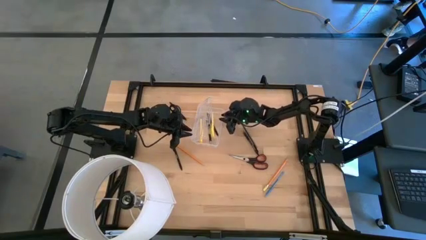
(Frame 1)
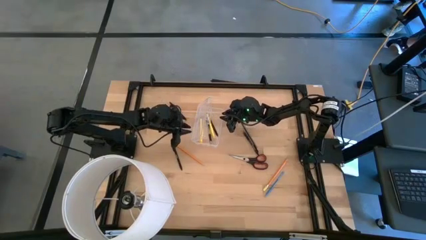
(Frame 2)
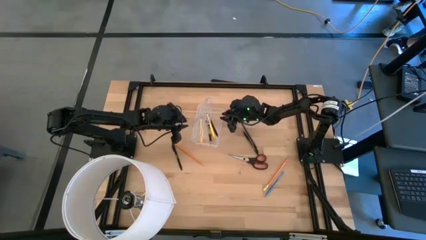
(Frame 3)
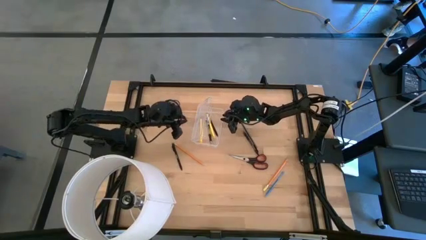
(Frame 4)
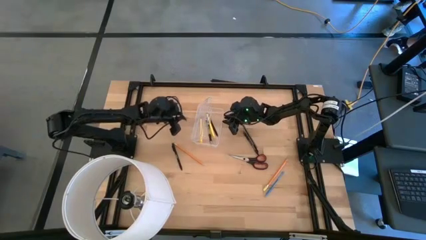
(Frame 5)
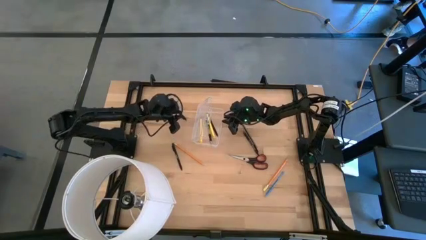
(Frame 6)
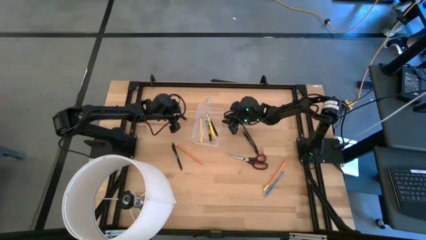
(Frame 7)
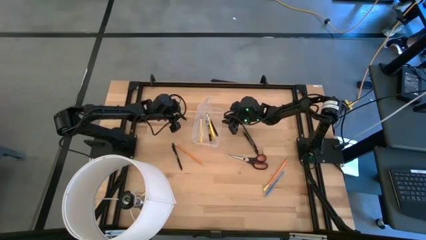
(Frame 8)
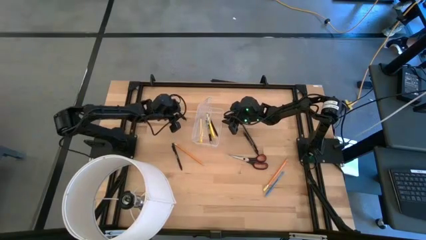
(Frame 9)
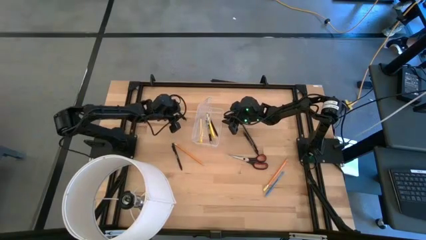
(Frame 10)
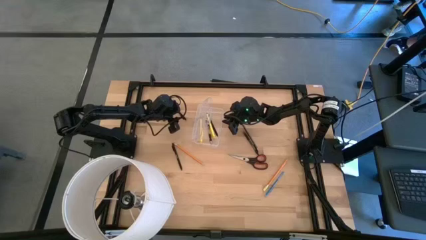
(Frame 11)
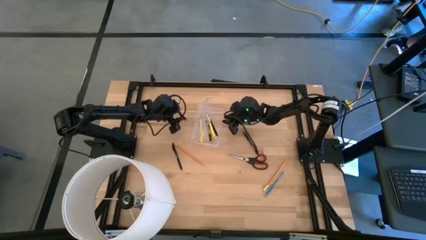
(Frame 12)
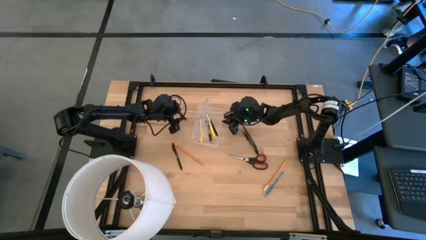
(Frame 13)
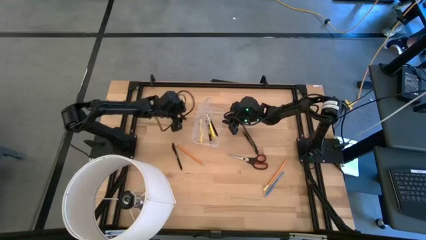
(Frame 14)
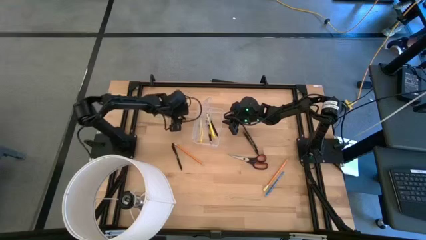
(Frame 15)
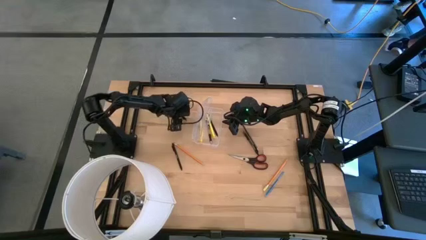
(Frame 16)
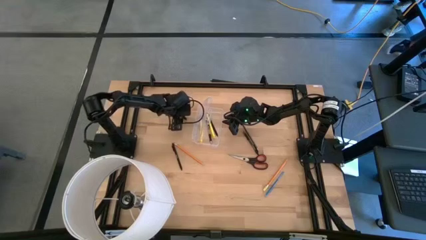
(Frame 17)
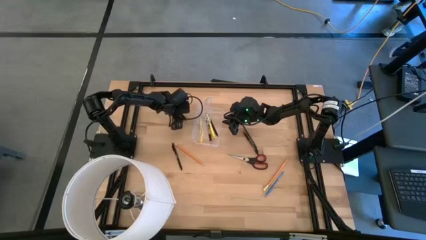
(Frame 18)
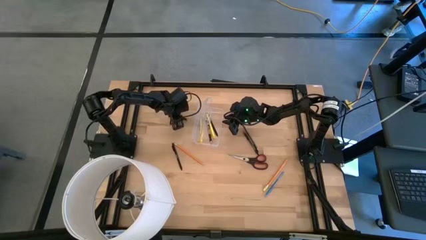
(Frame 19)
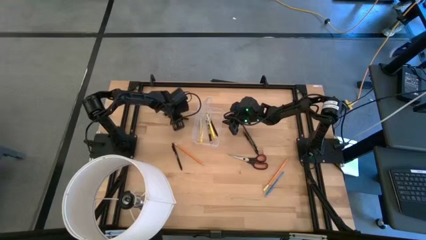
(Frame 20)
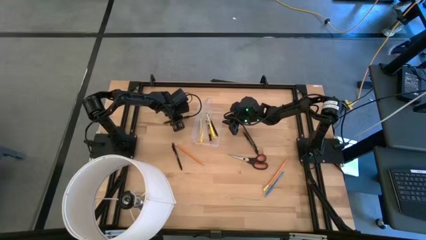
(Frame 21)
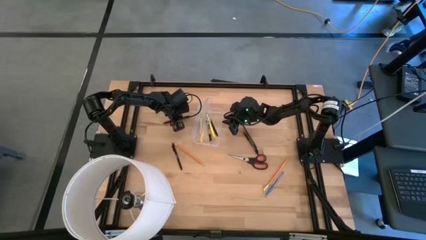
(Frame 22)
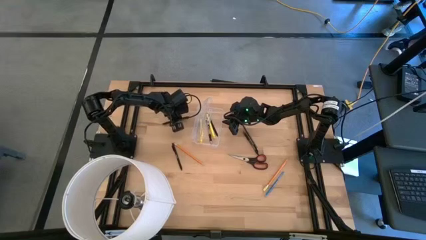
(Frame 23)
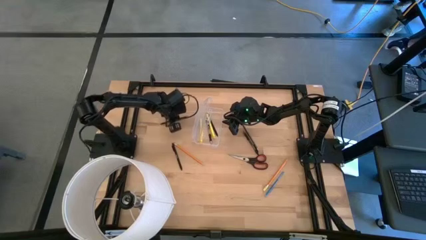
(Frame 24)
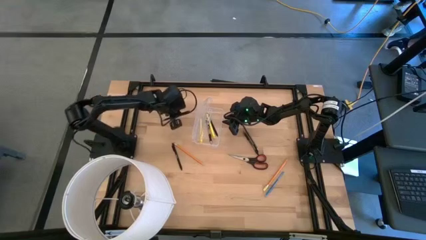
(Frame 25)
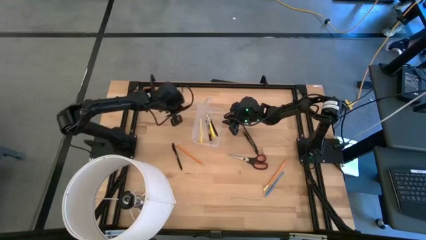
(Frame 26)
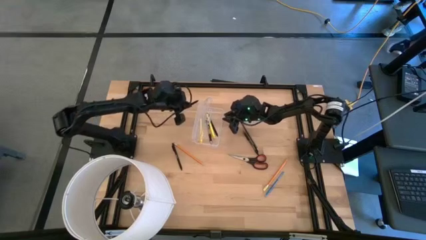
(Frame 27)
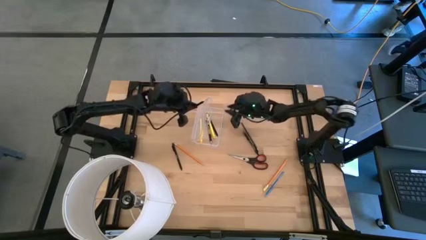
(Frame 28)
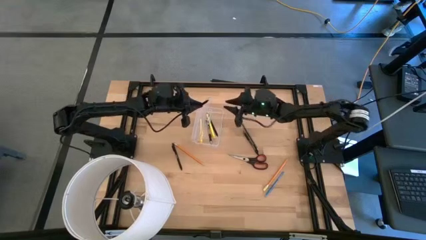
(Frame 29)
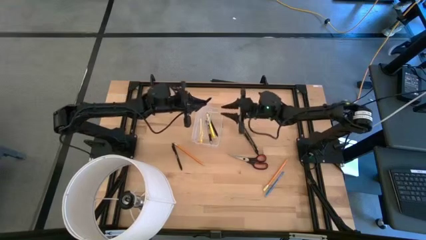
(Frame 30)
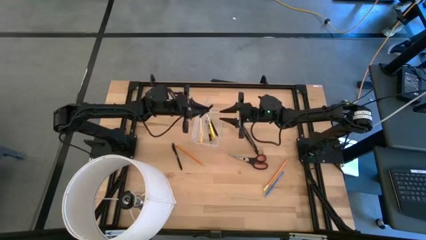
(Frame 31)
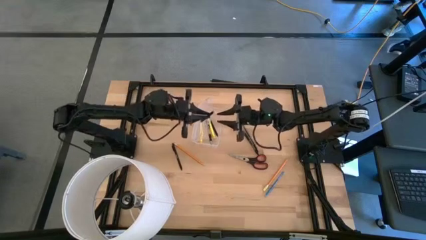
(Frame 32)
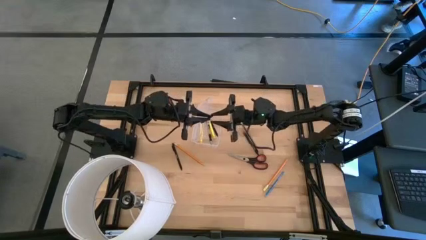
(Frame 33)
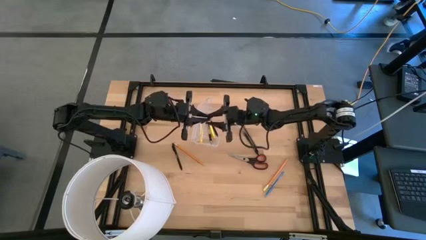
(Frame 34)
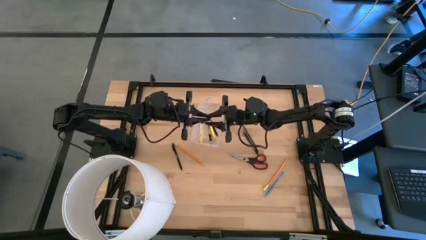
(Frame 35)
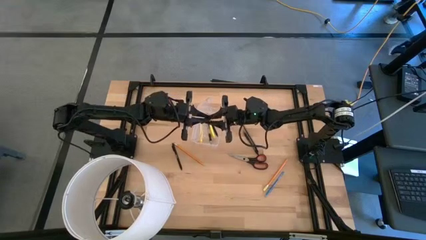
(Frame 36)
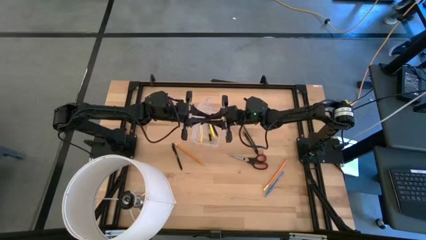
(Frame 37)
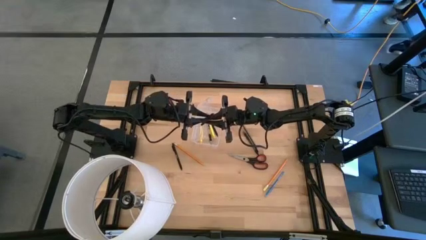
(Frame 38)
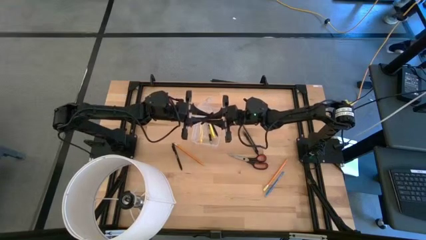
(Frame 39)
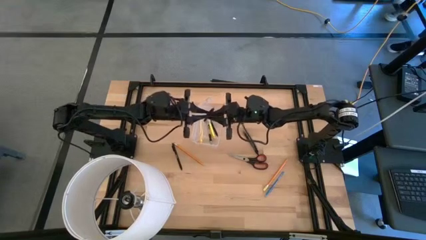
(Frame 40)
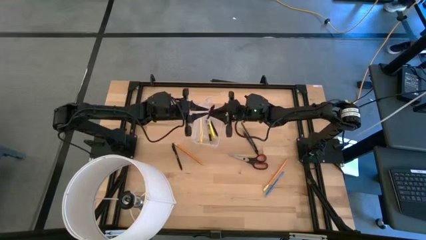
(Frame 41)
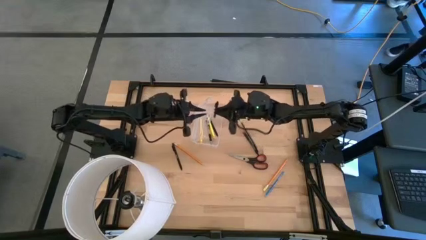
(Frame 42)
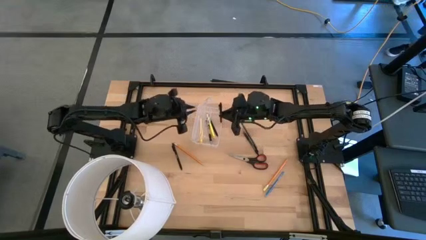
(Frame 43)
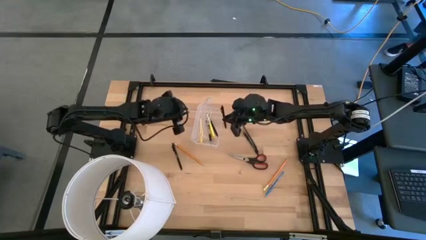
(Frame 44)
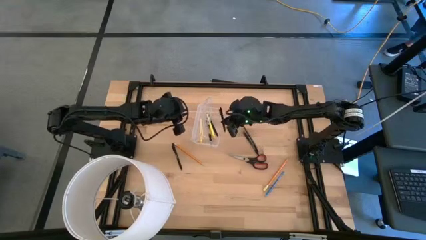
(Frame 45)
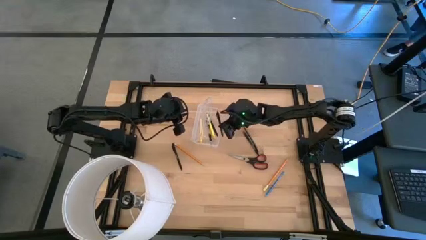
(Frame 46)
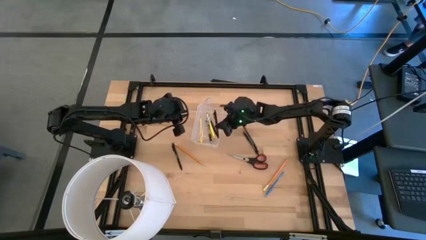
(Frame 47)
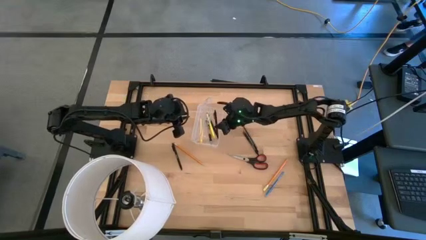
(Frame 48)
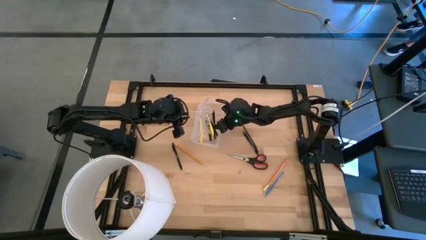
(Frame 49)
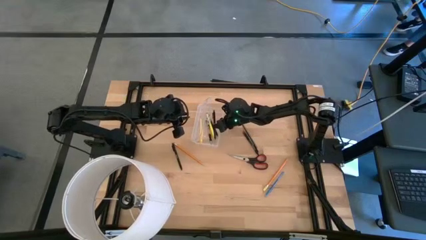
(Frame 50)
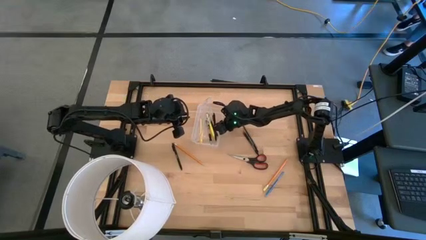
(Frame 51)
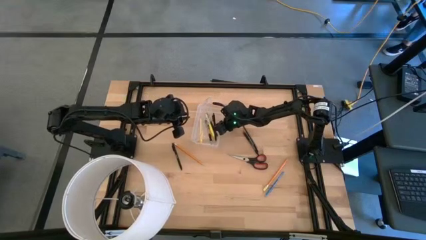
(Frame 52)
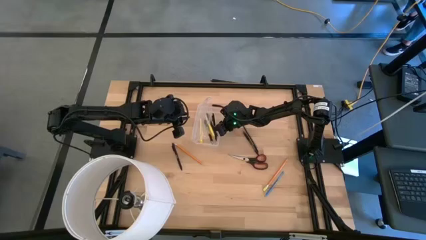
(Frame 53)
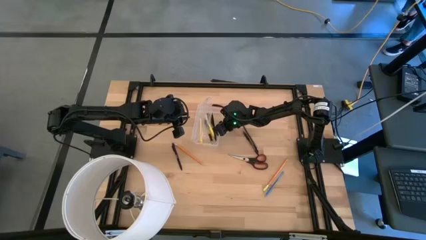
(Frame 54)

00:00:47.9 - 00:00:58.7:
Task: Pick & place school supplies into a supply box
Put the top black pen into the transparent supply box

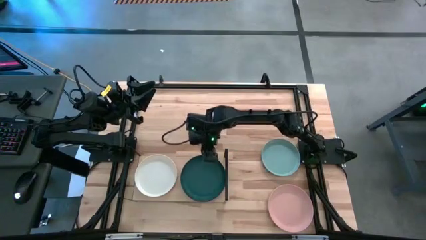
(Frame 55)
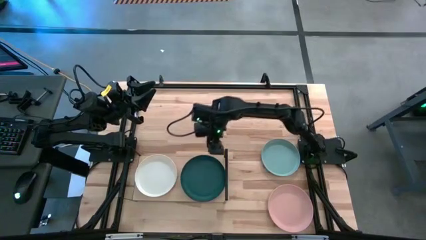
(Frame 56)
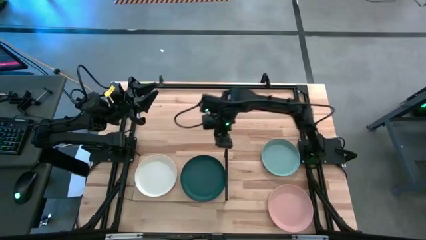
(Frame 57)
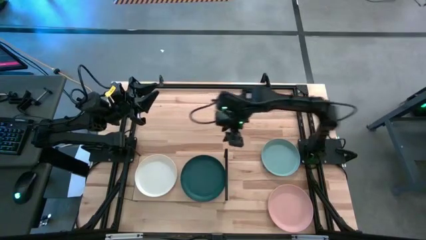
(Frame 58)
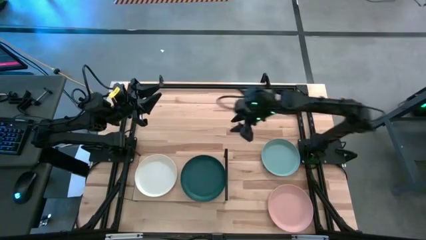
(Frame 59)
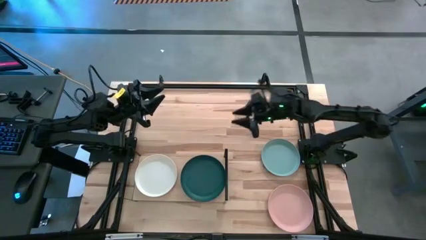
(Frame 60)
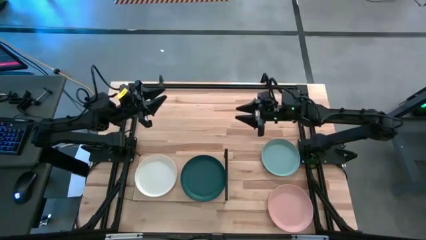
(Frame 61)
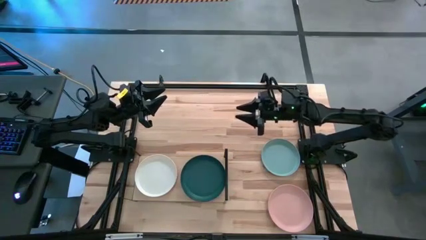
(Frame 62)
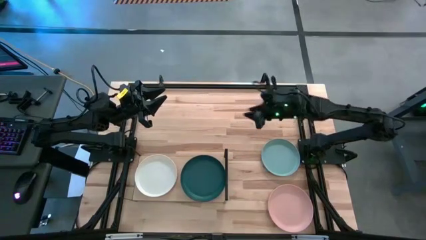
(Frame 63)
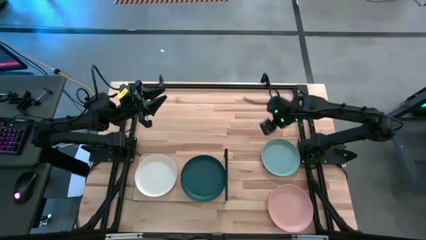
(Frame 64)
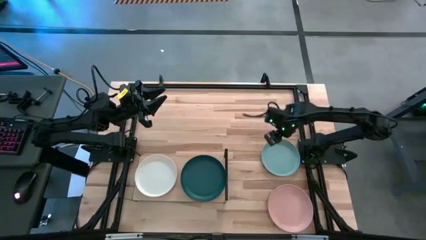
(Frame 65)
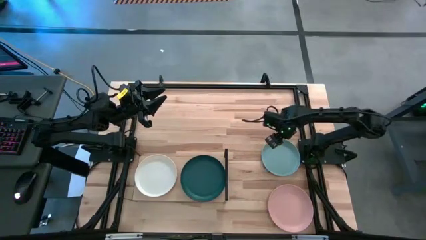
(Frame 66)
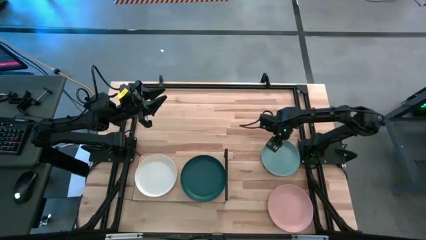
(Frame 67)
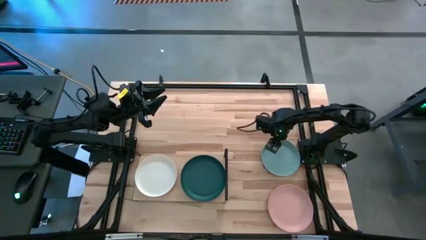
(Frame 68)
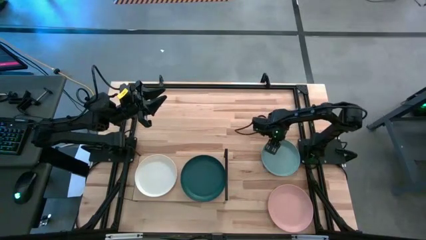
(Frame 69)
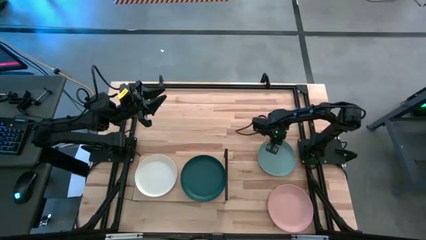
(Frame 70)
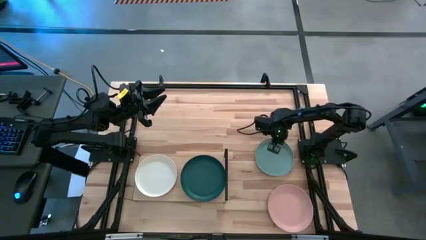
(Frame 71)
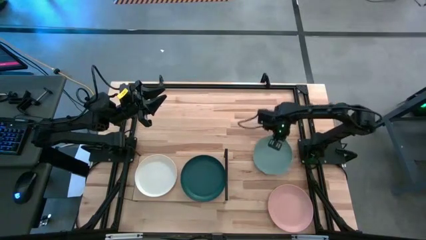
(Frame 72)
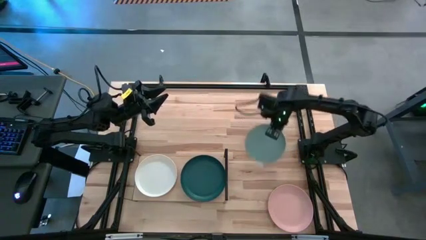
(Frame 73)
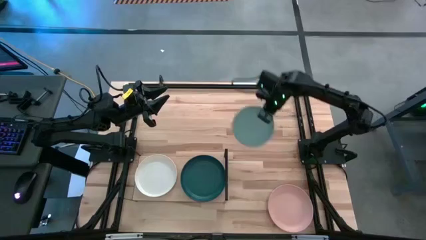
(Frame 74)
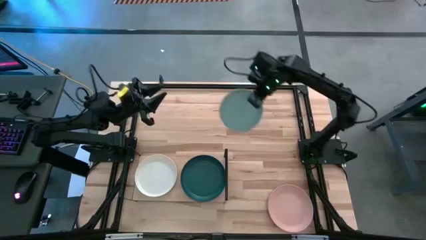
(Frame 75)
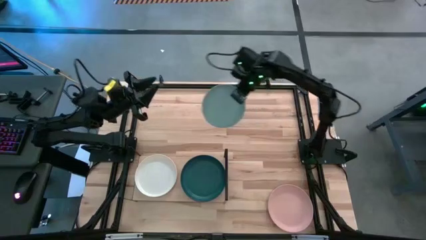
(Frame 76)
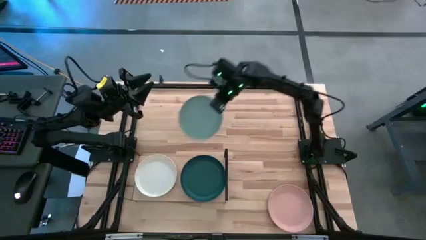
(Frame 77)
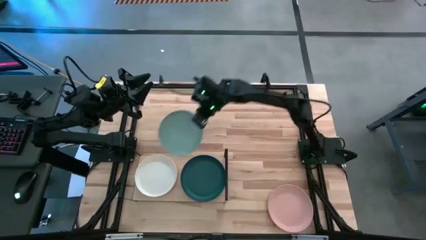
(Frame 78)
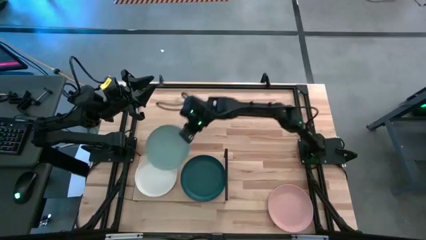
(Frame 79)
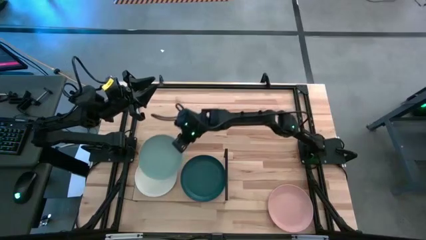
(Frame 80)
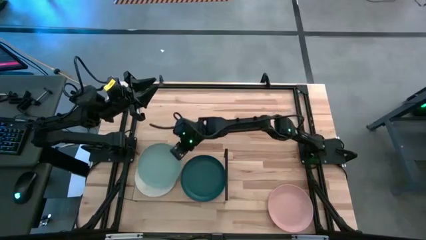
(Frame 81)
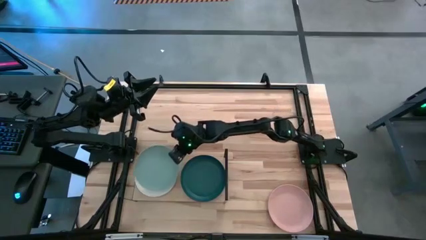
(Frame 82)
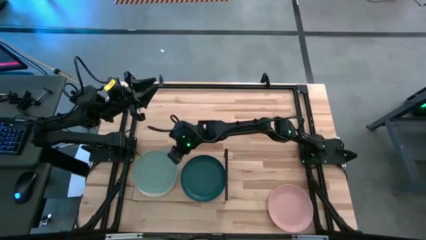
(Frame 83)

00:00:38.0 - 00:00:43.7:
Task: Place and stack plates onto a shelf
Stack the blue plate on top of the white plate on the shelf
